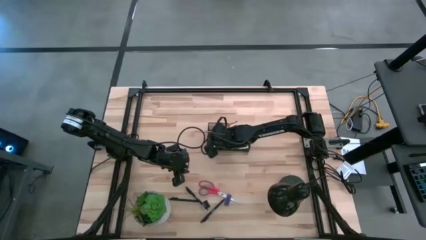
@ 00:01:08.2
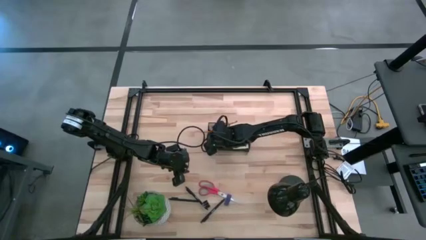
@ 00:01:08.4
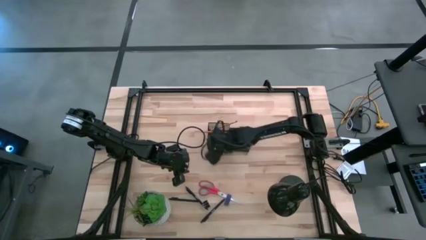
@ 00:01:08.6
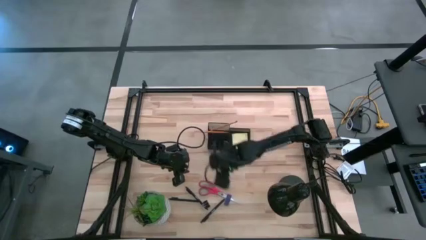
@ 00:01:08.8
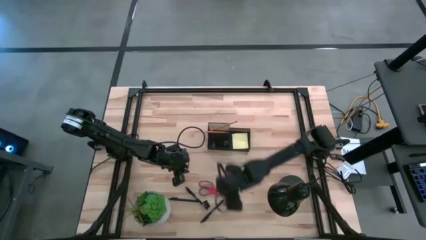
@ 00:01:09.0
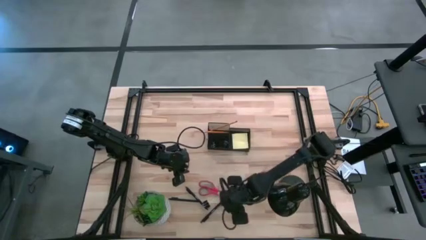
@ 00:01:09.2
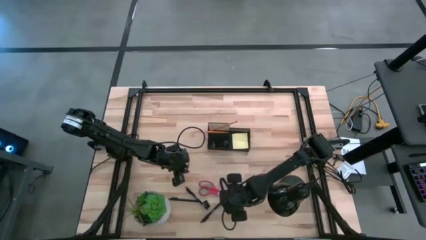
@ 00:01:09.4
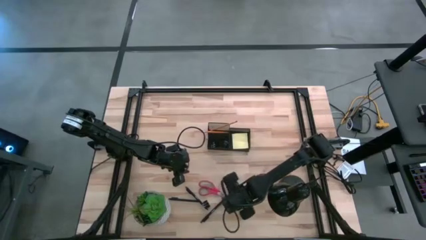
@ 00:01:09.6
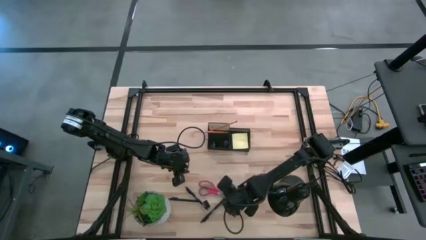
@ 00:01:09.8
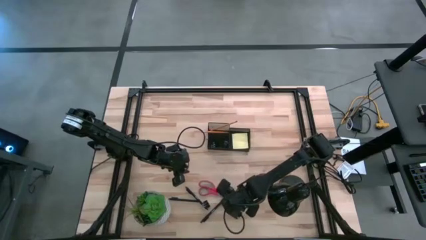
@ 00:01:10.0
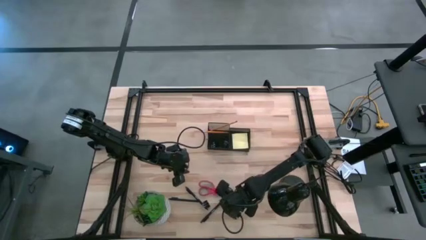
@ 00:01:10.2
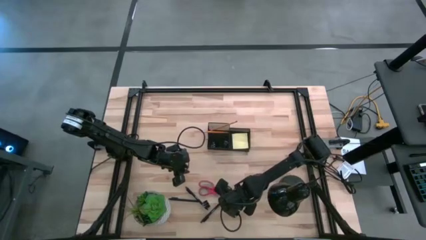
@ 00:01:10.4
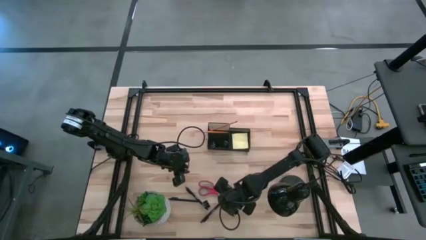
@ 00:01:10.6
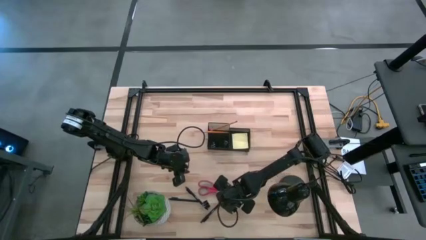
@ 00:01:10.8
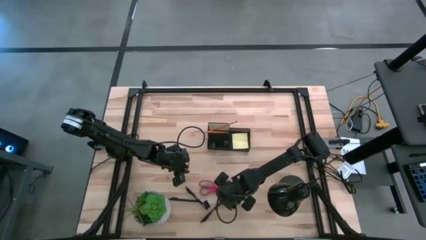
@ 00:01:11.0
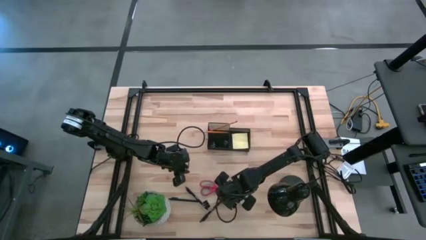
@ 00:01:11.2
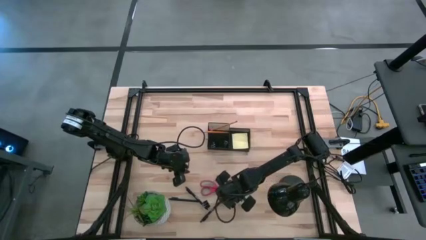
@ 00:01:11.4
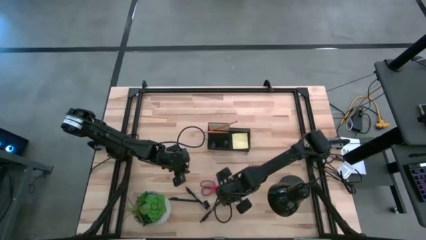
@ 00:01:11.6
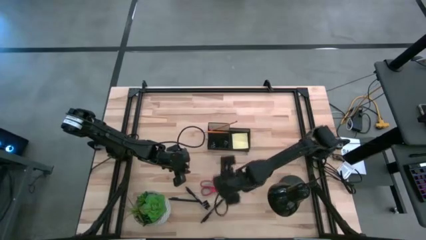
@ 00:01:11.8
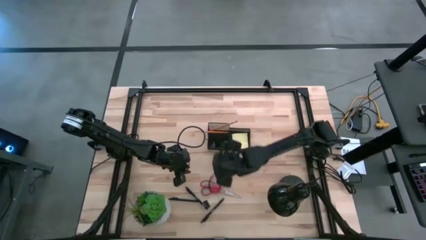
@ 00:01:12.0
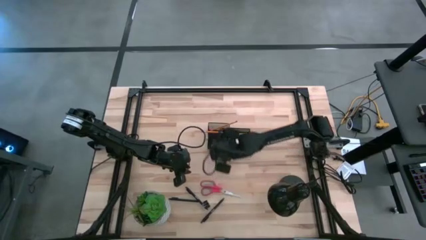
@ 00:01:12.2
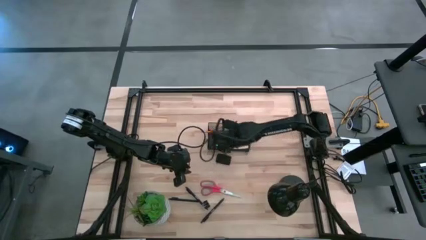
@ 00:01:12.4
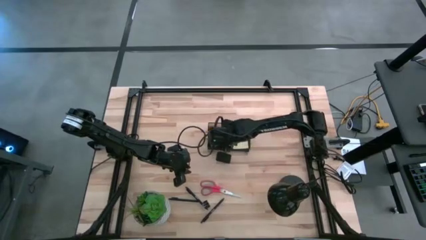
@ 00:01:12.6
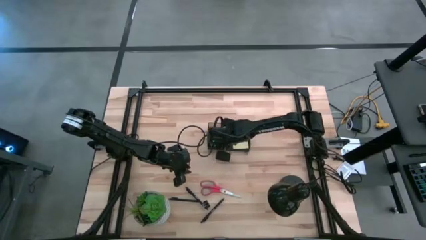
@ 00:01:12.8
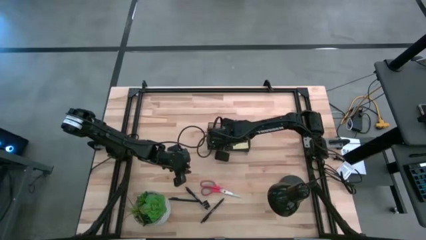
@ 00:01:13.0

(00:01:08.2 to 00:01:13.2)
Task: Pick and place office supplies into organizer
Put the violet eraser into the desk organizer

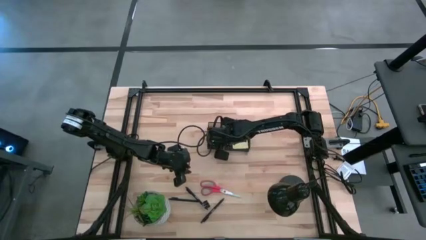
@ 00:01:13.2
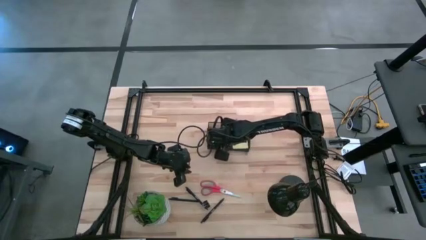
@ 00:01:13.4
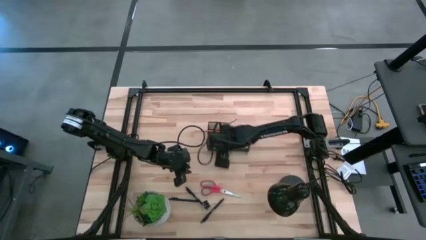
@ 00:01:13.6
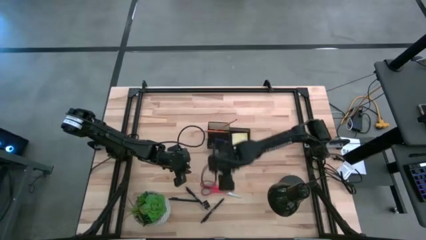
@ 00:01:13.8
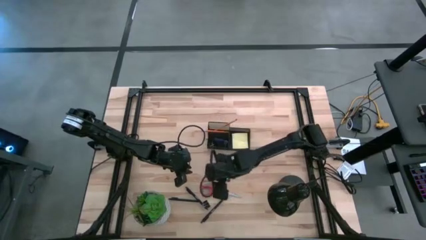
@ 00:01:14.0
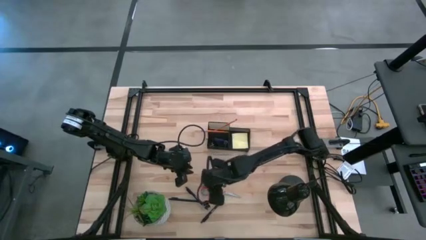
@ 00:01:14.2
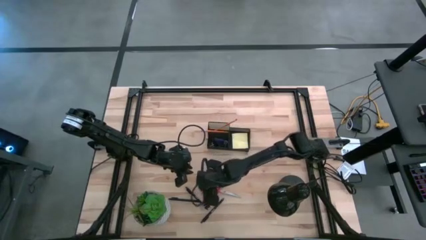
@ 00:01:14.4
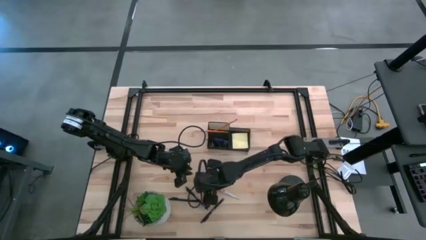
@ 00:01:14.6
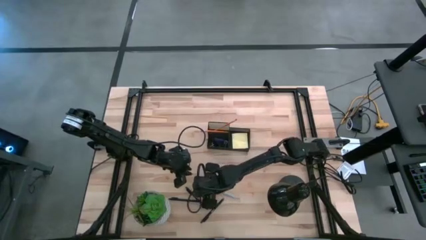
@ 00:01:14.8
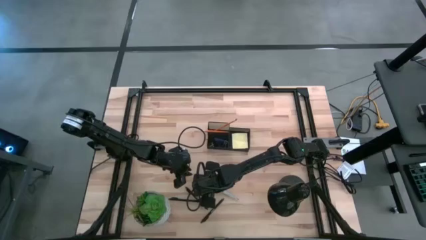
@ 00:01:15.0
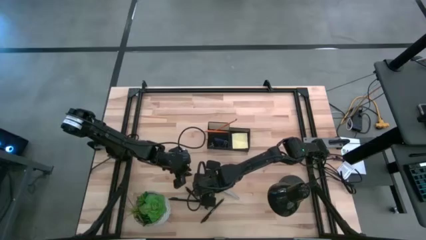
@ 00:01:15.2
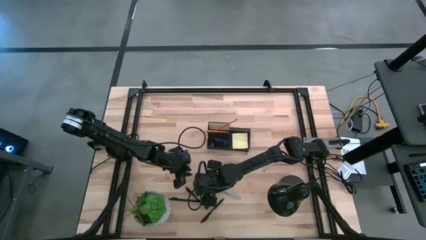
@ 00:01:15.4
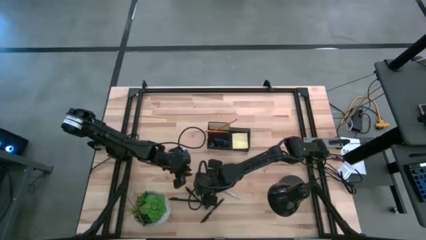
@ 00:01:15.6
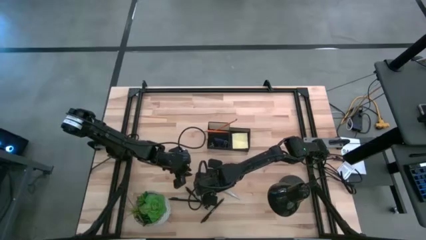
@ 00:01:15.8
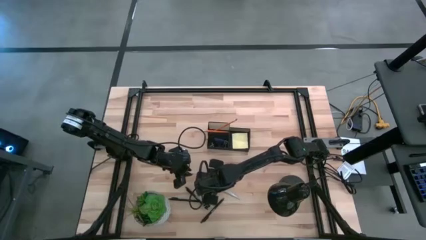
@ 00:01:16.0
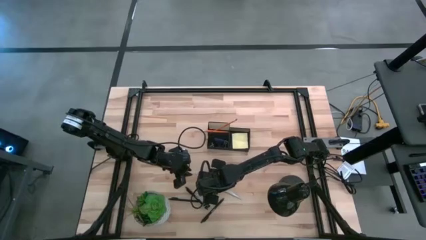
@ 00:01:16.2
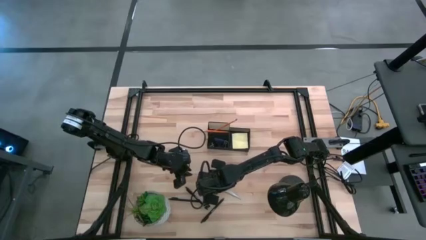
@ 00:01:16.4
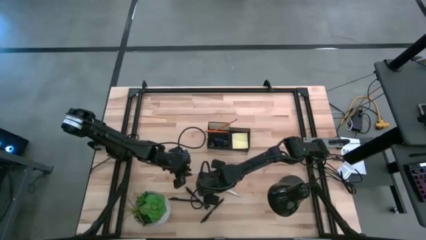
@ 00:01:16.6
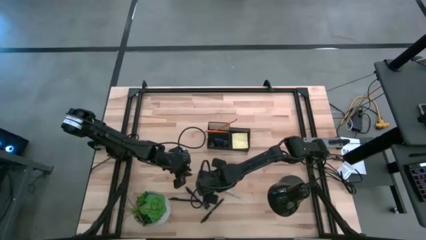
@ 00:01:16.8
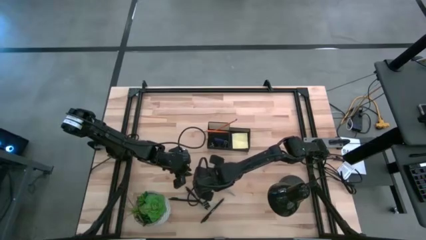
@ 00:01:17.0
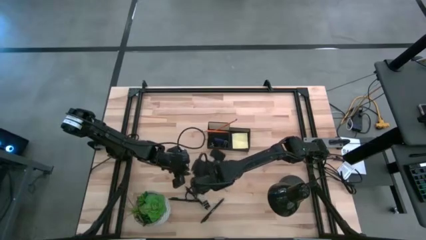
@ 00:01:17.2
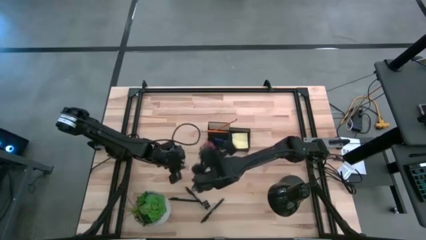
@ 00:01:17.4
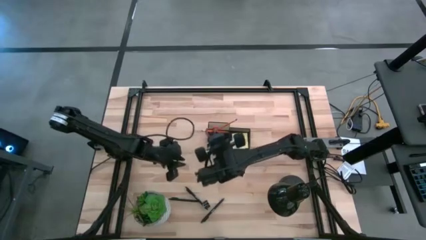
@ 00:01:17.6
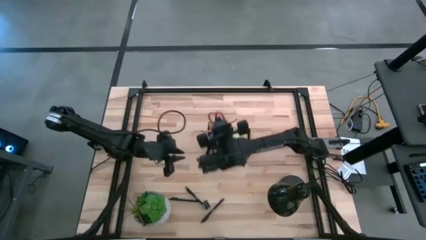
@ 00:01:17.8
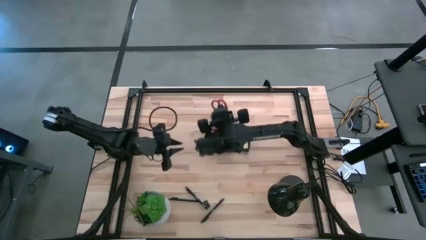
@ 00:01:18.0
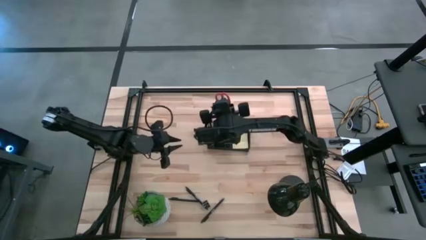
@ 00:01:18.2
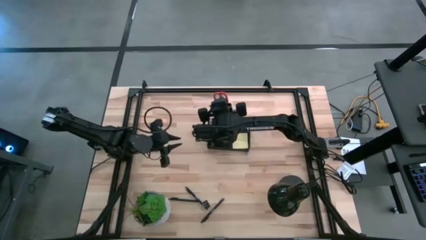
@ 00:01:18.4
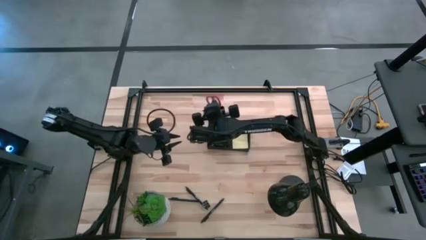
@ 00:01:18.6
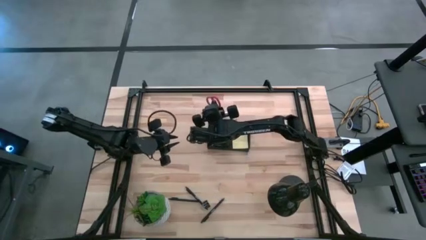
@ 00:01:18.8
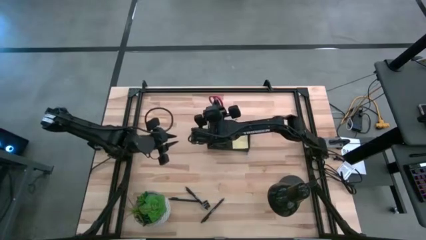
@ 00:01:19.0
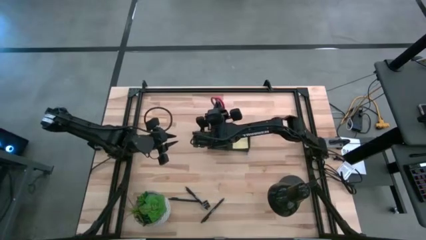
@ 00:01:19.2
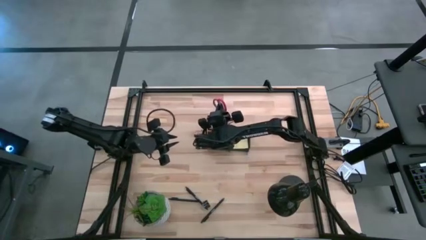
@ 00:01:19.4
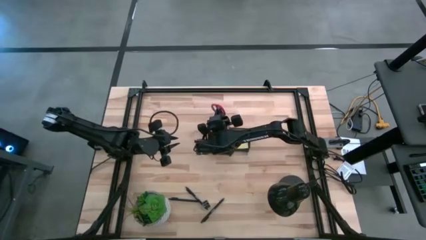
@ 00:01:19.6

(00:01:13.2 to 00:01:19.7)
Put the red scissors into the desk organizer

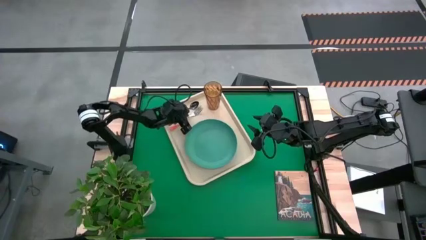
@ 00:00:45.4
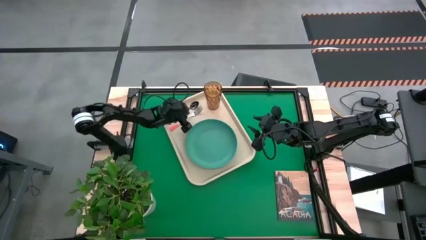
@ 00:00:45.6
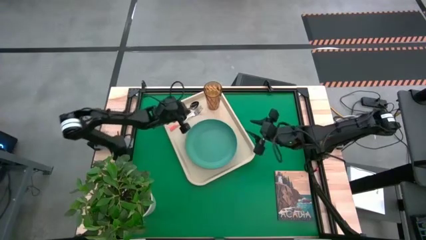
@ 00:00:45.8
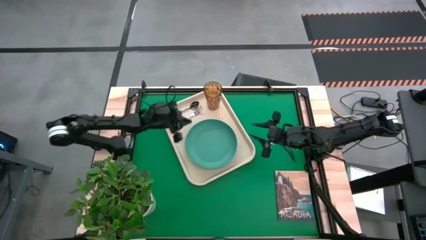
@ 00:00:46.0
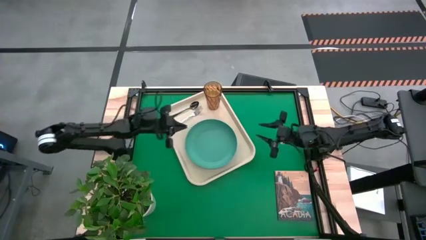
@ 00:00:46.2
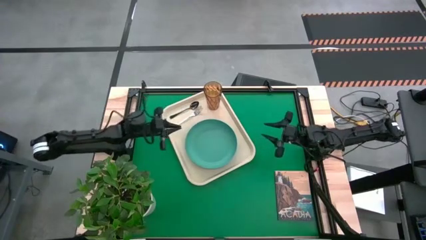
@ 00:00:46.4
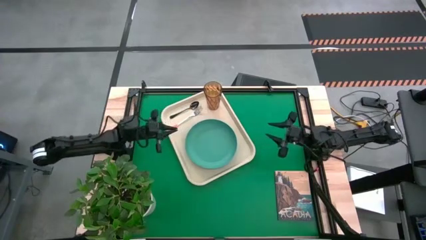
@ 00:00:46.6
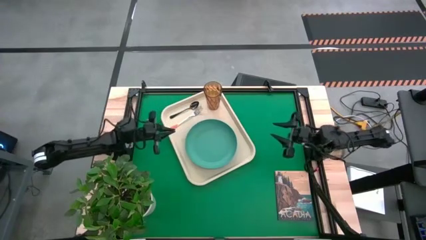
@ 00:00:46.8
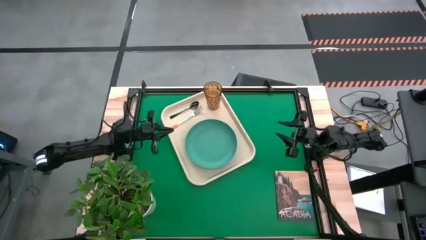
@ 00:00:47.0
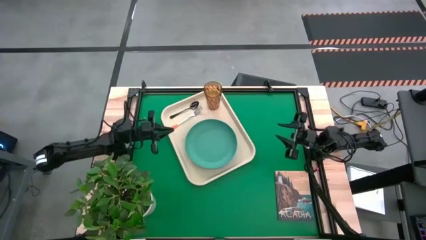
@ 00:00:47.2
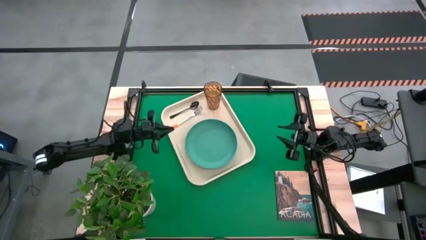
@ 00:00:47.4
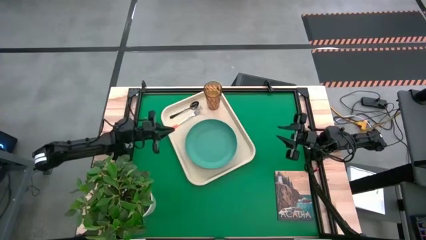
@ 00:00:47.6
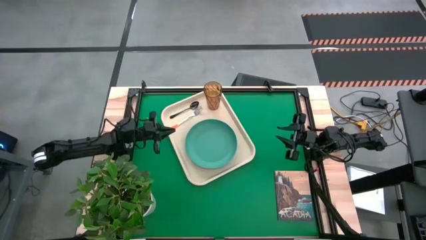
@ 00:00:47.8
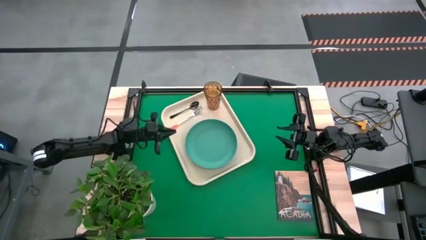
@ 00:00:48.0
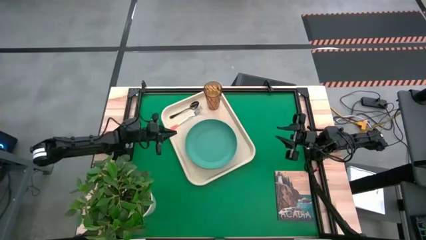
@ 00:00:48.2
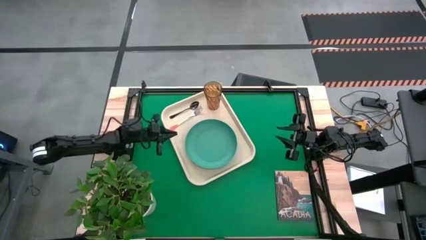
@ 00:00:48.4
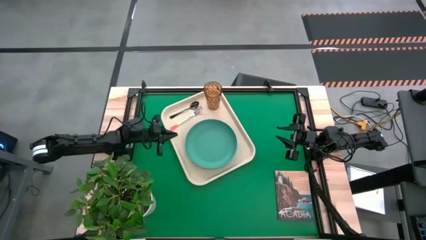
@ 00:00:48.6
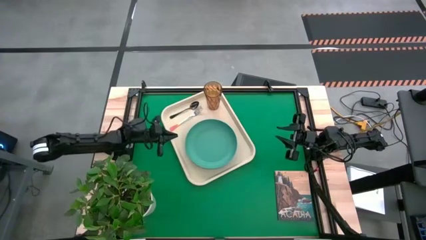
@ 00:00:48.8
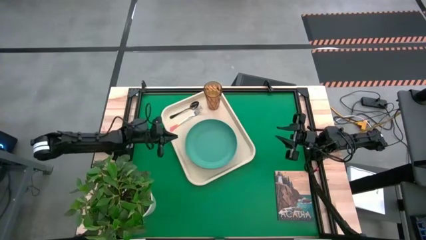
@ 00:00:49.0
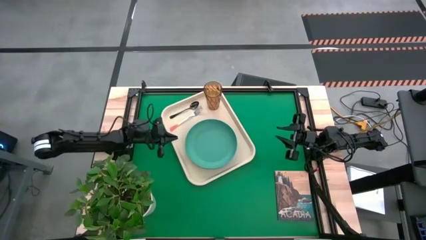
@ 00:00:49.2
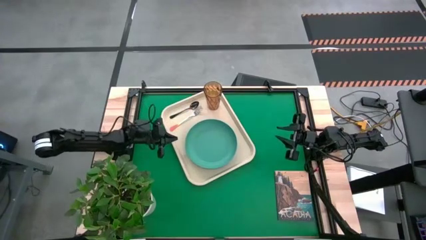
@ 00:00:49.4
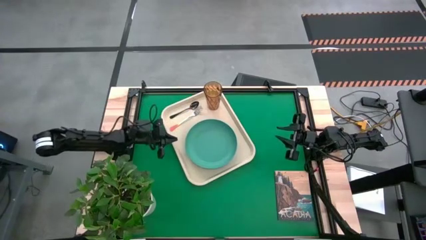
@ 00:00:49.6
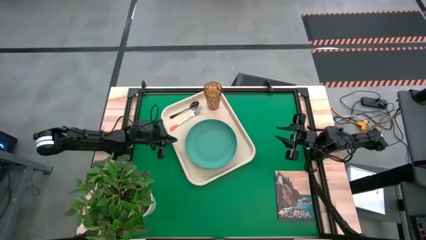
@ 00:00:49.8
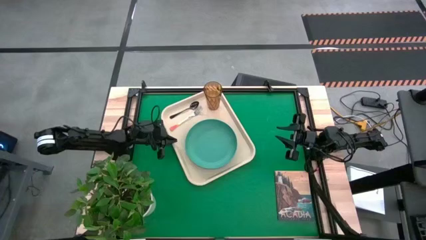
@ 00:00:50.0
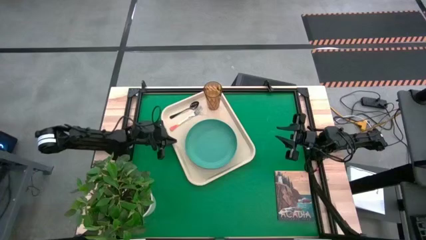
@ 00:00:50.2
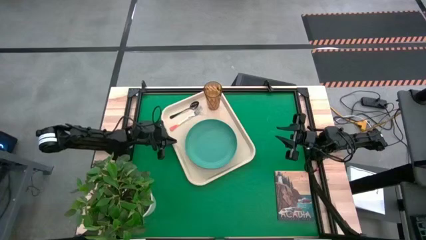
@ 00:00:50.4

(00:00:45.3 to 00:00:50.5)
Task: Pick and place plate/cup/fork/spoon on tray
Return to Home Position
